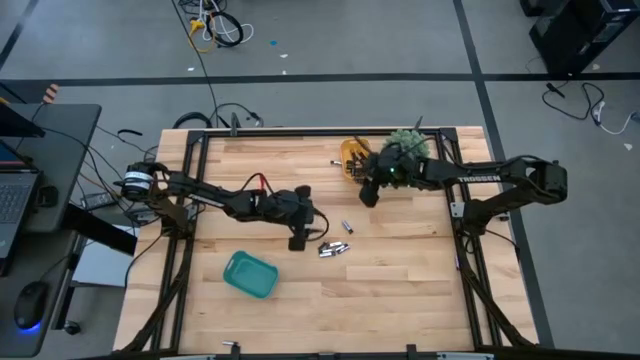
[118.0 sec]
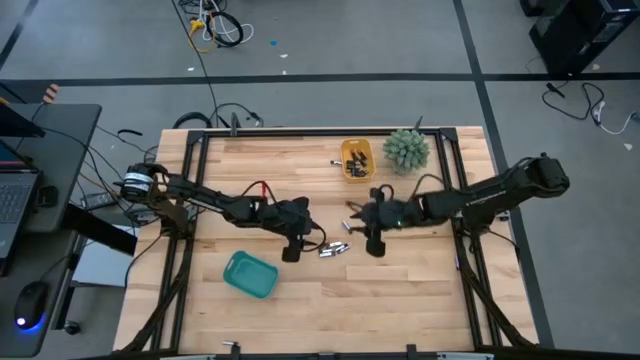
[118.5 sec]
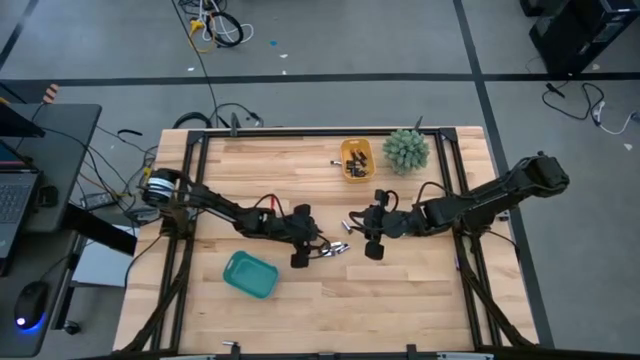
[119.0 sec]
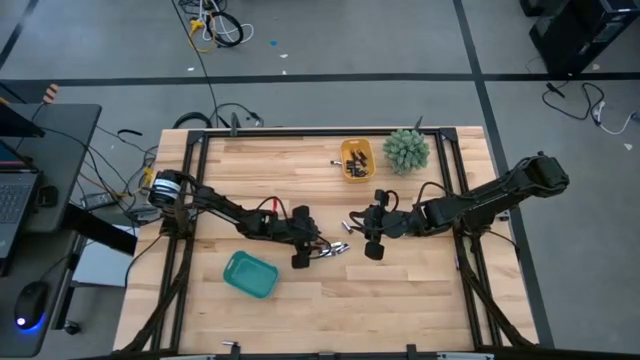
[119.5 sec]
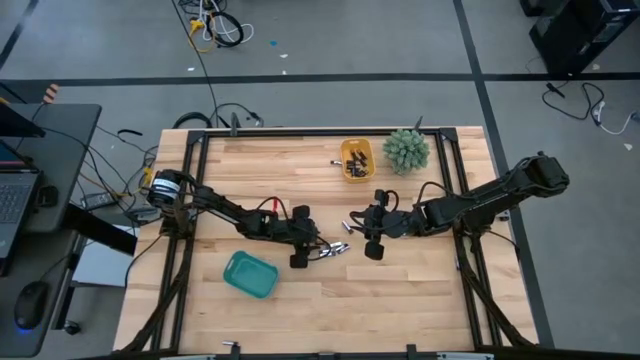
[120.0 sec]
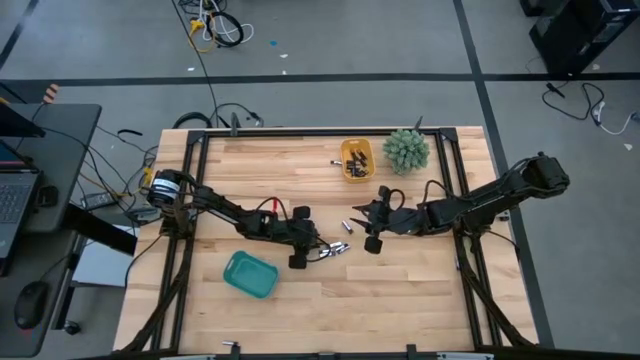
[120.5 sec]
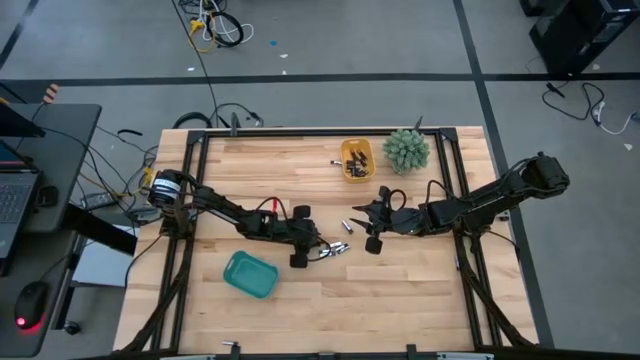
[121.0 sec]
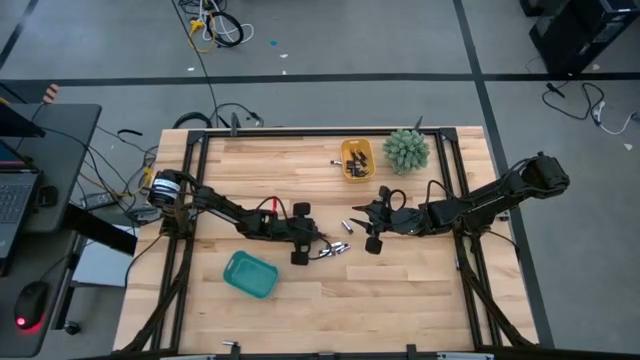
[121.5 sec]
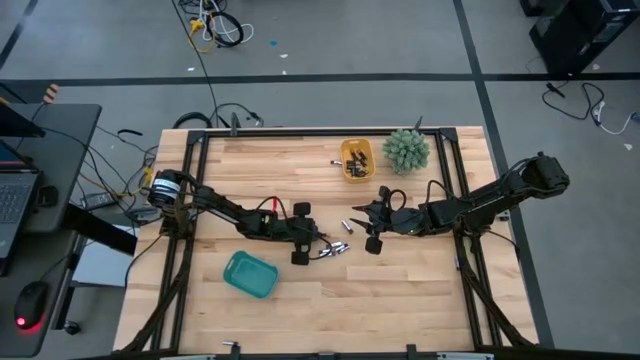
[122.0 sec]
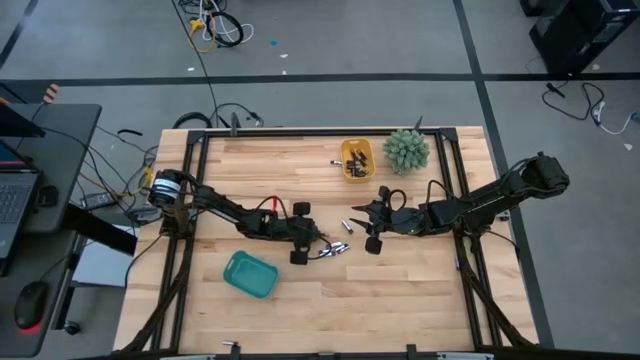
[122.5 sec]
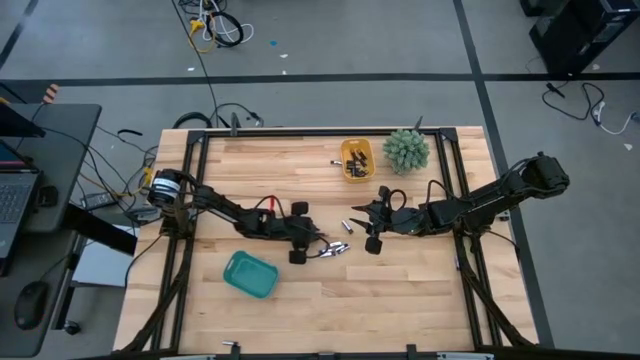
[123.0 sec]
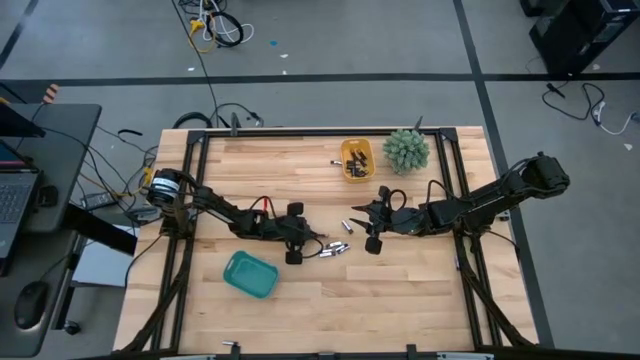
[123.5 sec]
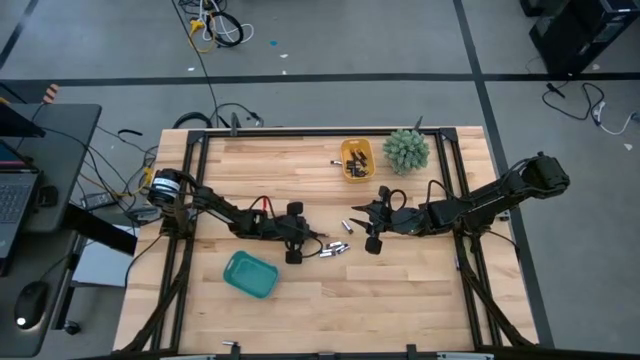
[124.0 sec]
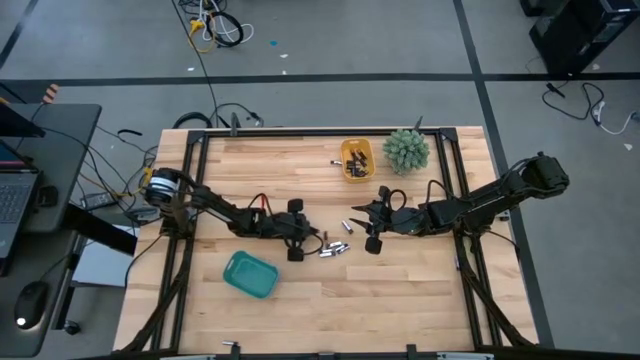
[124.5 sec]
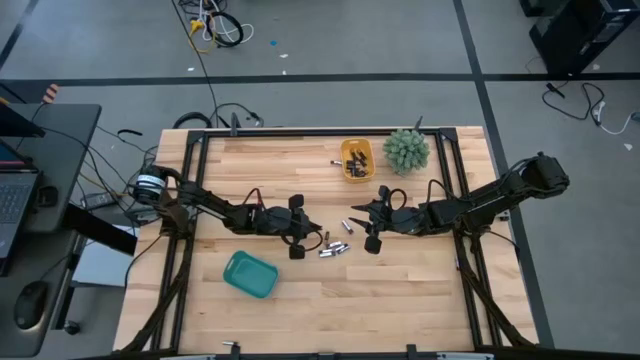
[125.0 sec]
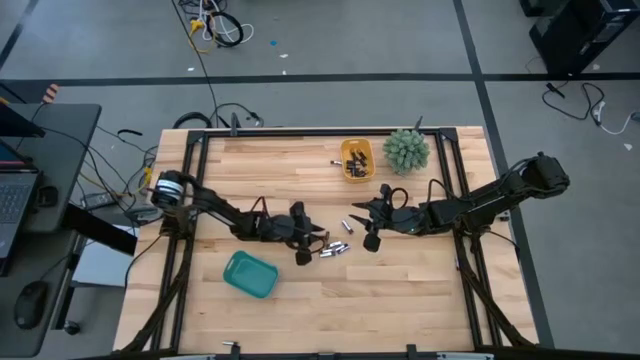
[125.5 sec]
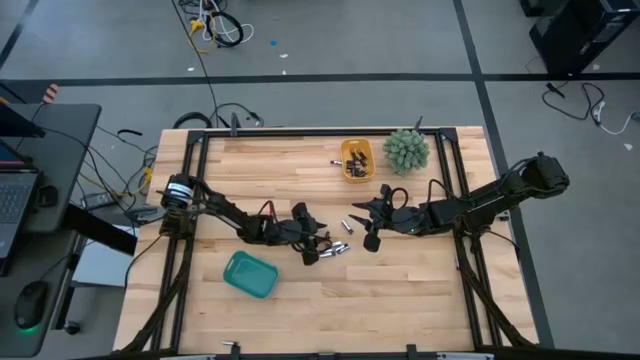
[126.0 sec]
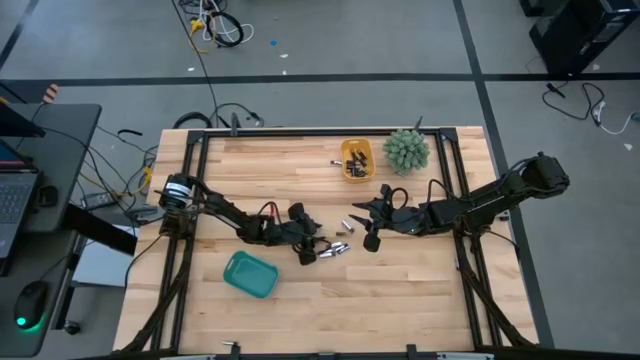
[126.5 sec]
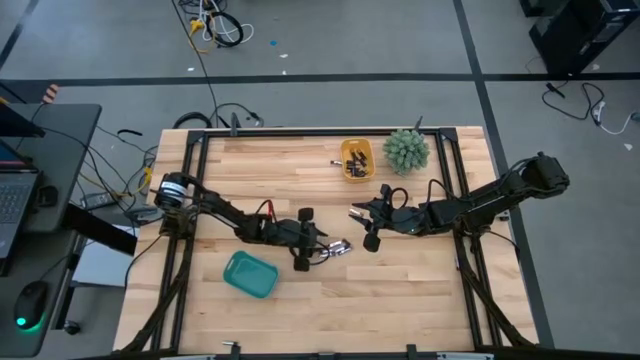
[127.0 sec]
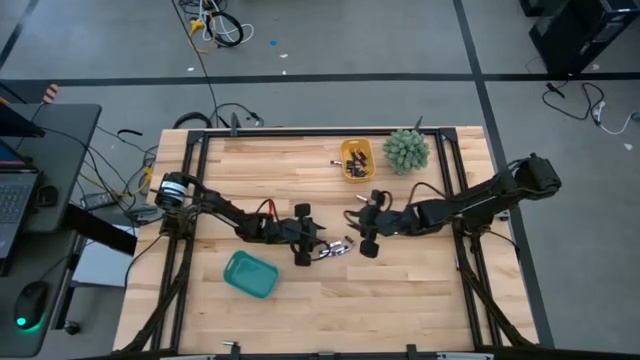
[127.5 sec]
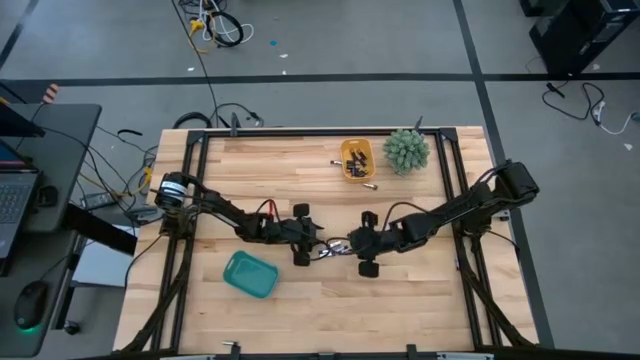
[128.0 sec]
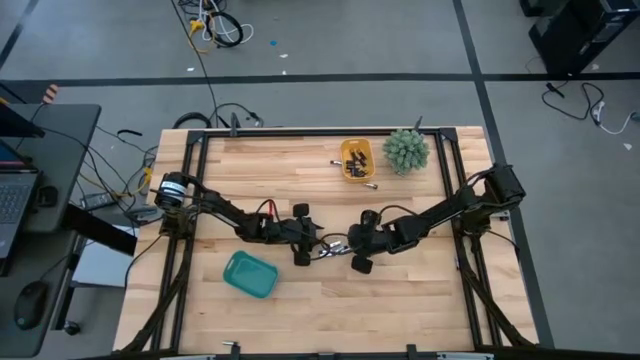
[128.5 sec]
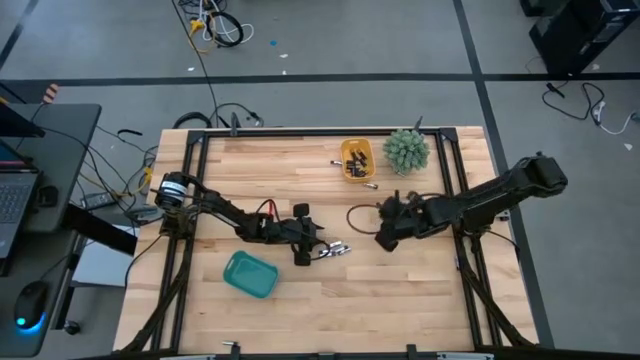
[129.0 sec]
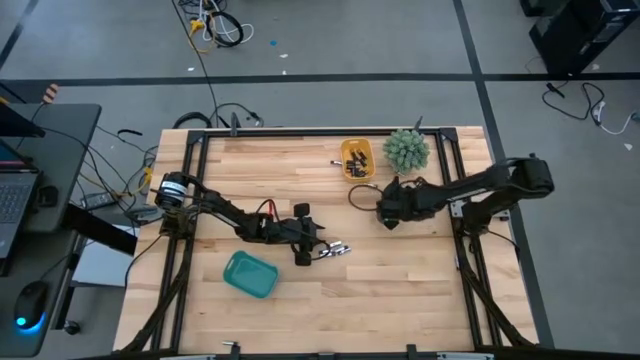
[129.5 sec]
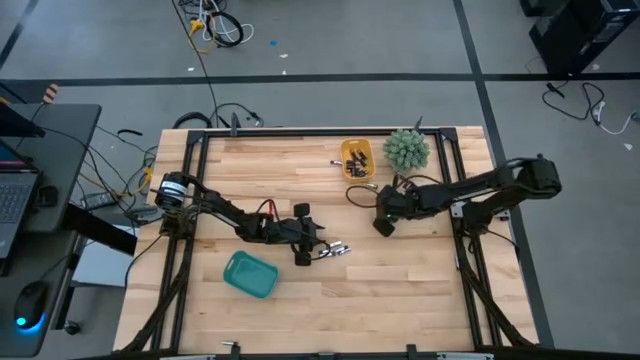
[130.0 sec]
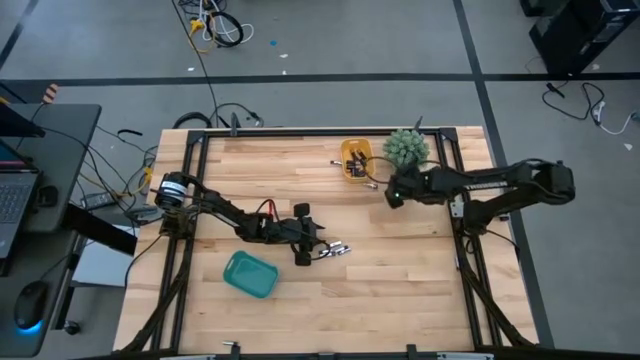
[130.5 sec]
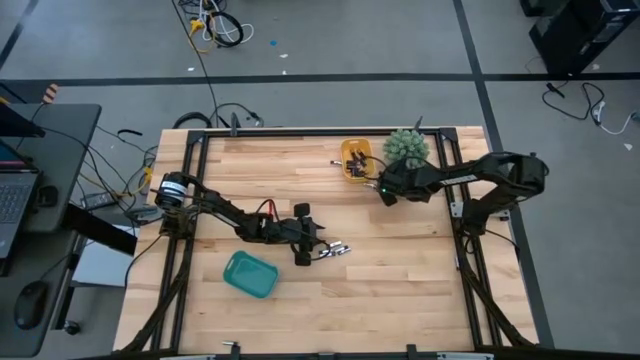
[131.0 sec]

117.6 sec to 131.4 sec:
Task: Sort batteries
Put the black battery into the yellow bin

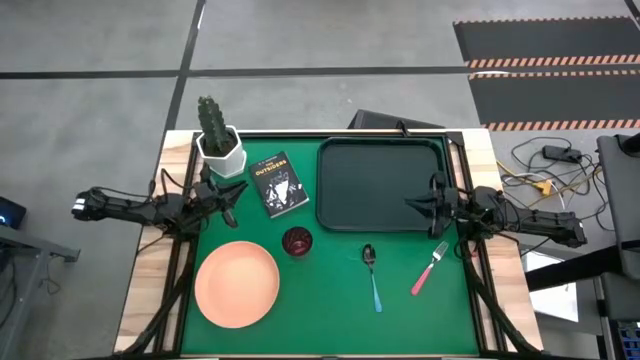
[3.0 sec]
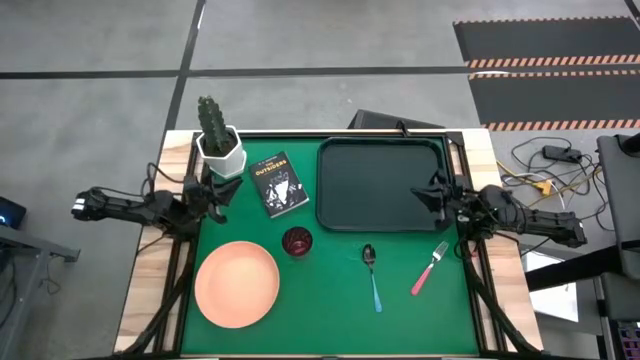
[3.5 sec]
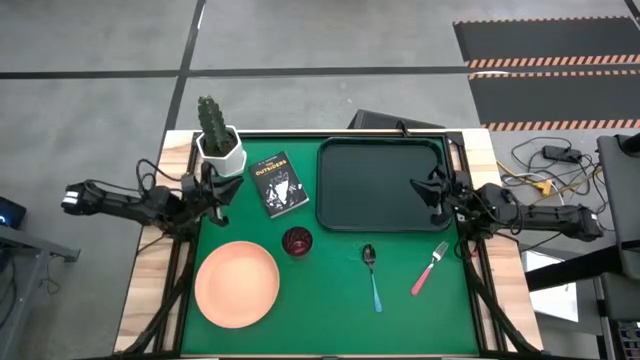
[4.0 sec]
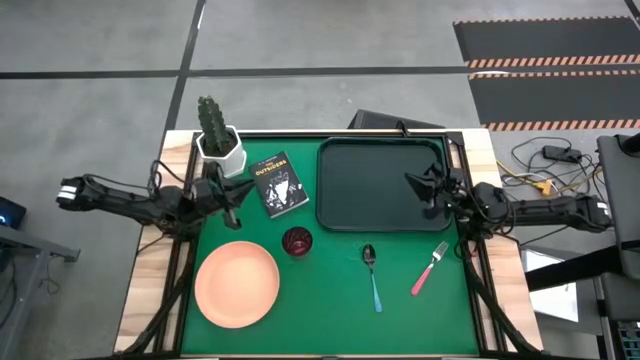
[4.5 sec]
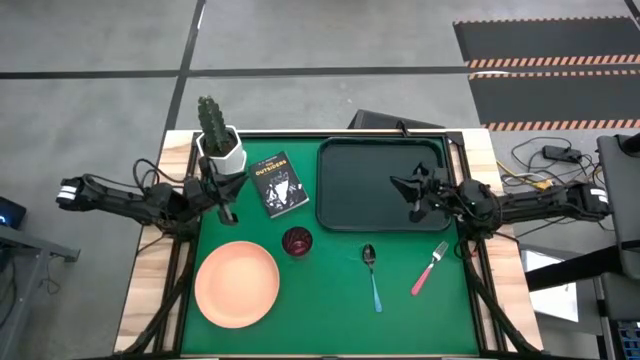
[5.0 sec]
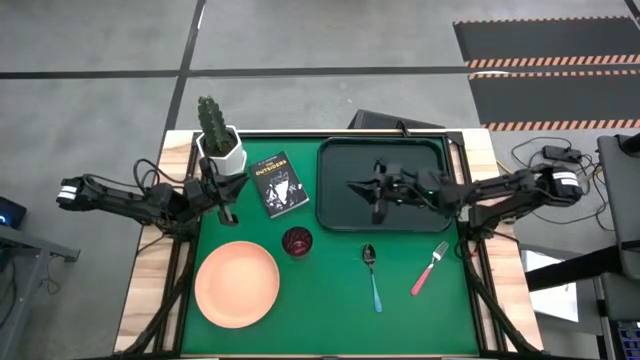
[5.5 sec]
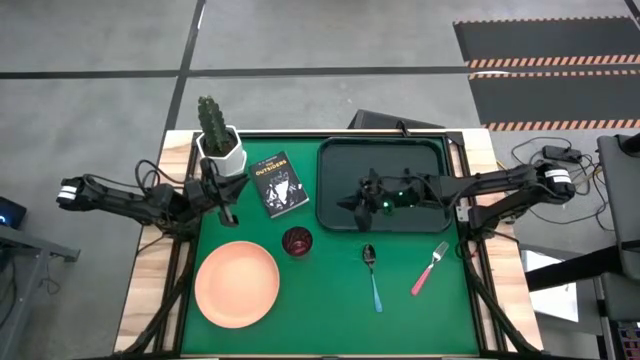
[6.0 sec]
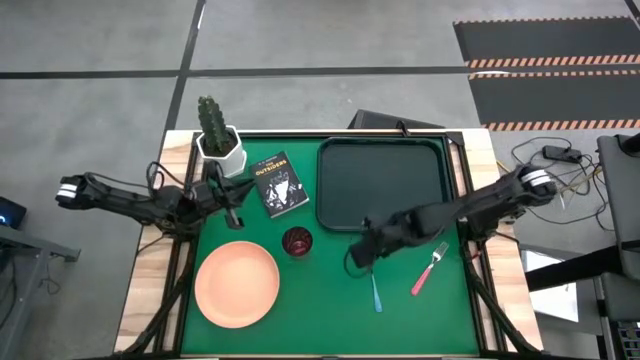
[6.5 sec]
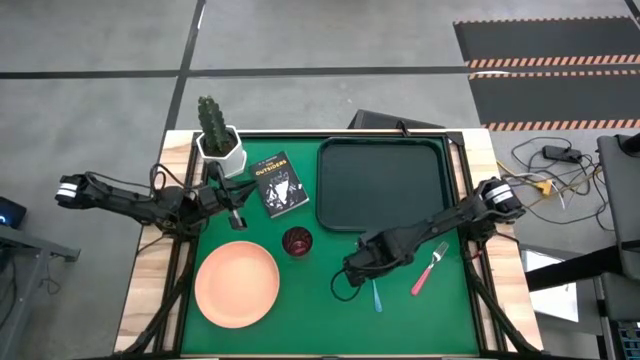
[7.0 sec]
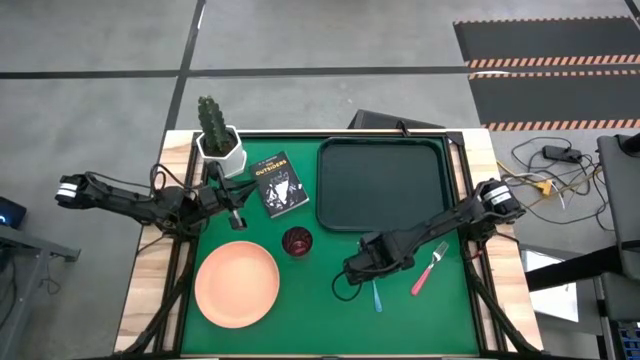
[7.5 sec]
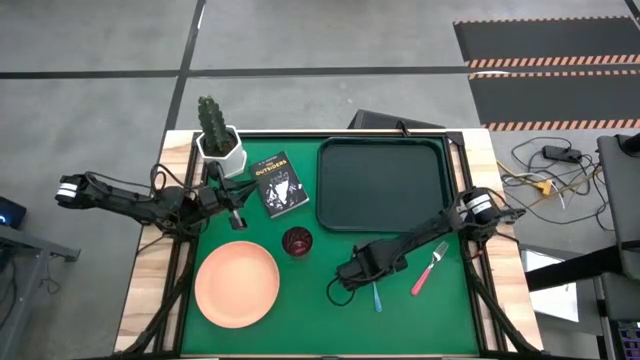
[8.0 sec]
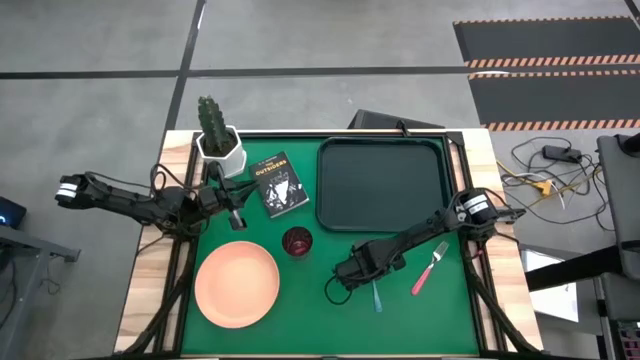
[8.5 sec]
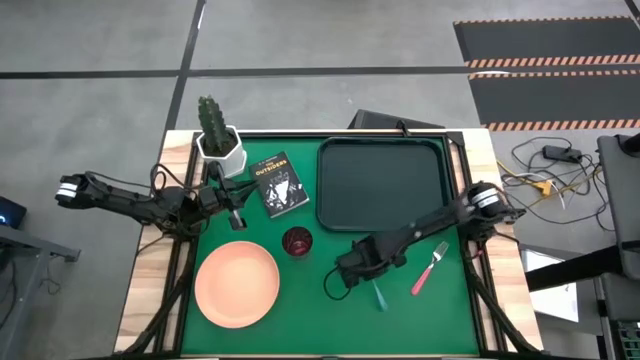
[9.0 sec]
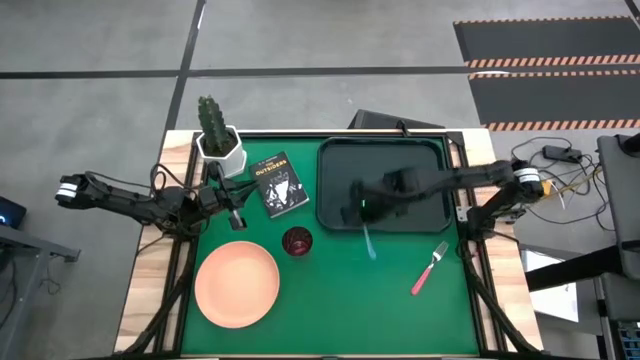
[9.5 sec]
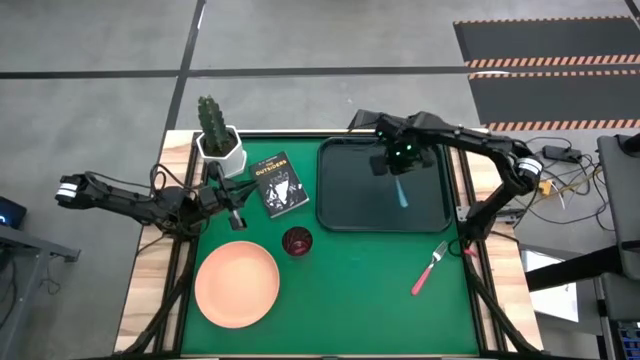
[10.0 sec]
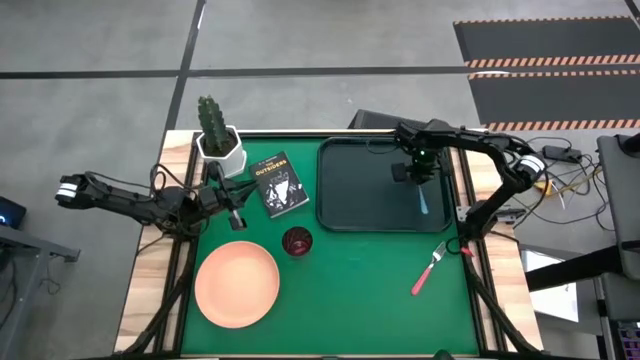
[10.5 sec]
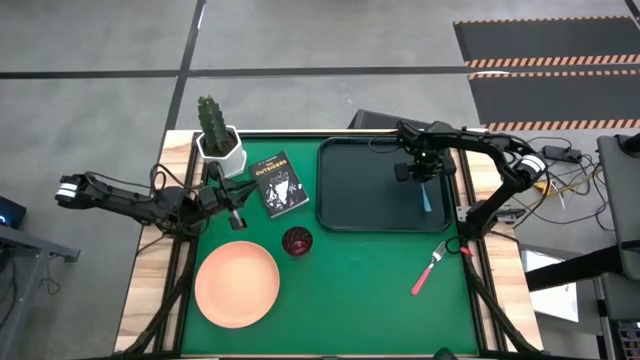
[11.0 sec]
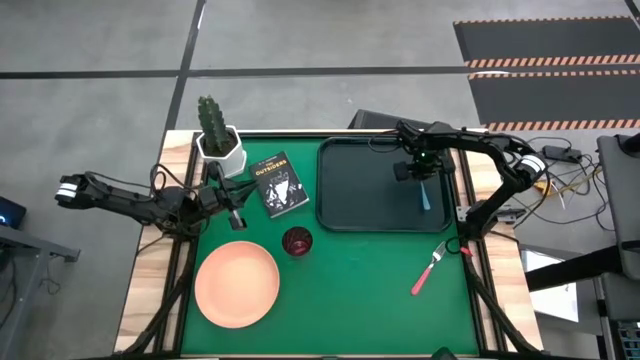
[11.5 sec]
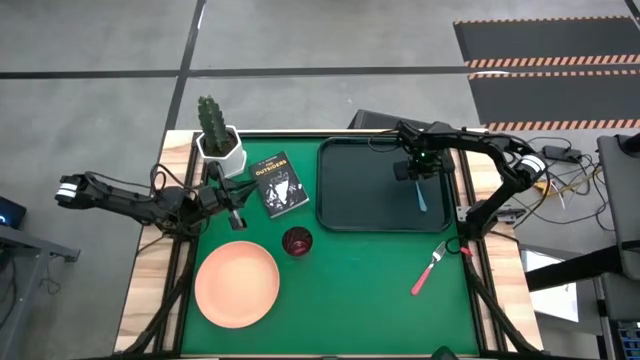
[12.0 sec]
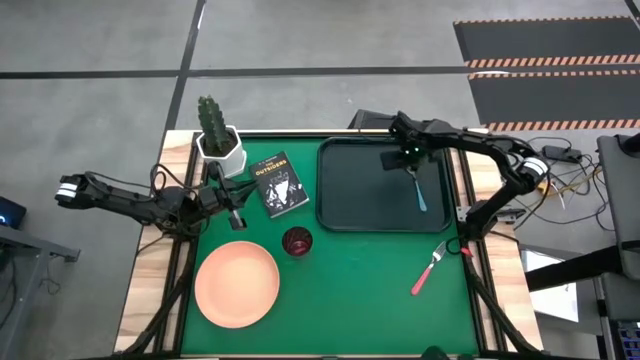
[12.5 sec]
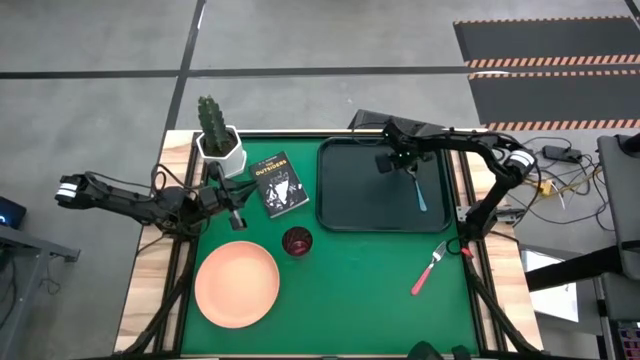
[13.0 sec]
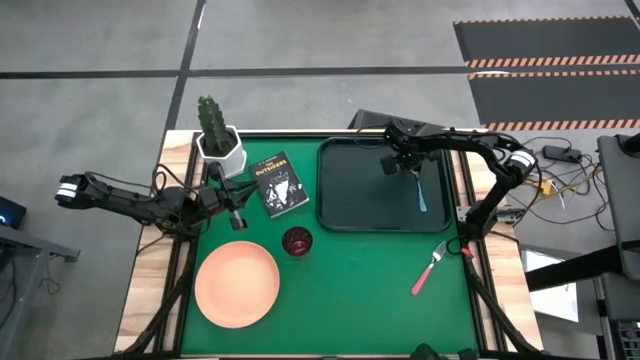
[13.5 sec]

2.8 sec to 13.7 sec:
Task: Pick and place plate/cup/fork/spoon on tray
Put the blue spoon on the black serving tray
